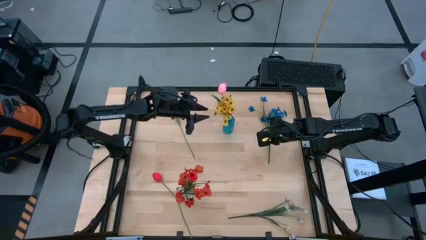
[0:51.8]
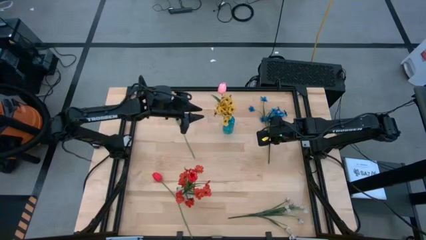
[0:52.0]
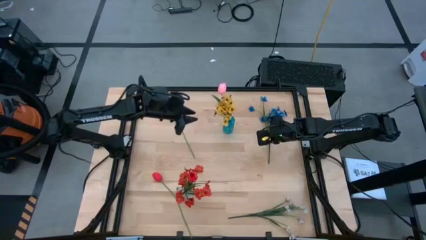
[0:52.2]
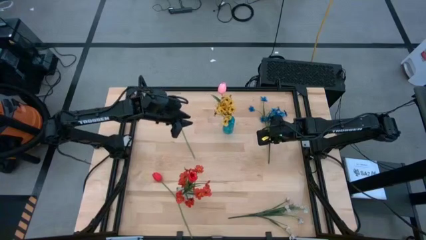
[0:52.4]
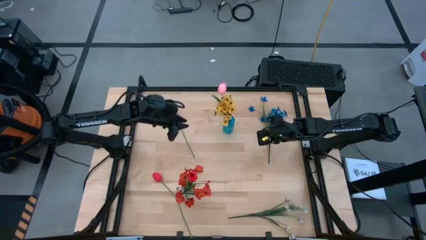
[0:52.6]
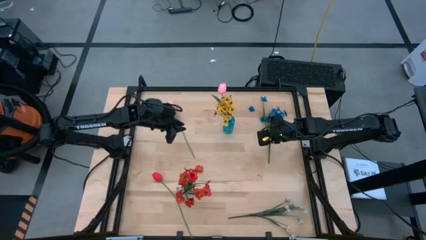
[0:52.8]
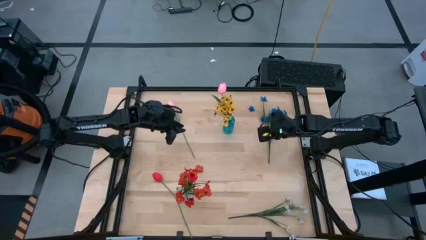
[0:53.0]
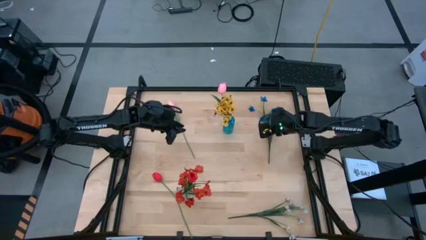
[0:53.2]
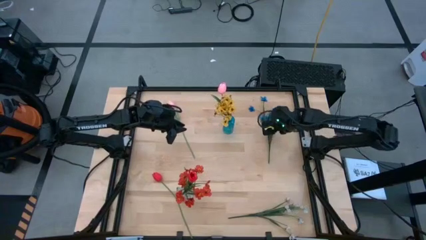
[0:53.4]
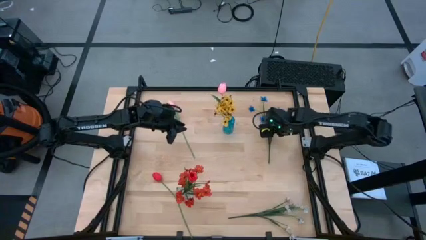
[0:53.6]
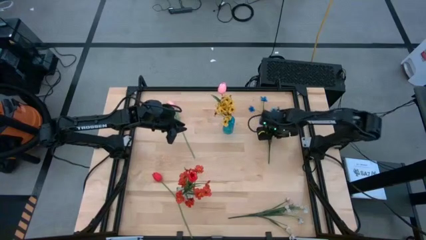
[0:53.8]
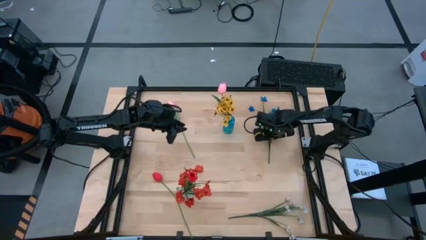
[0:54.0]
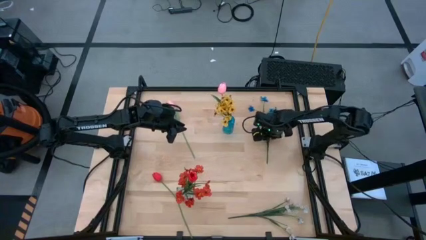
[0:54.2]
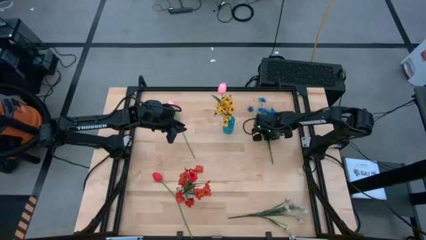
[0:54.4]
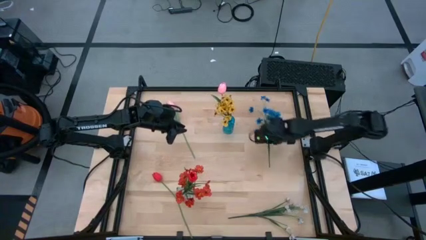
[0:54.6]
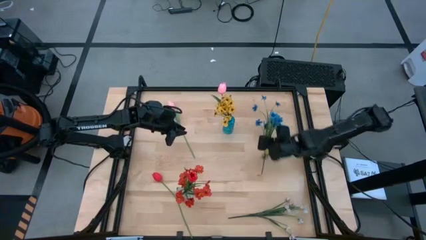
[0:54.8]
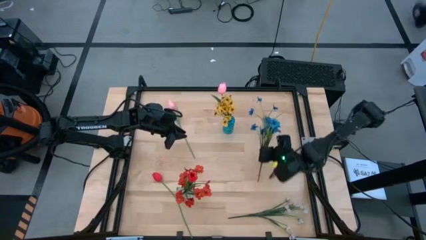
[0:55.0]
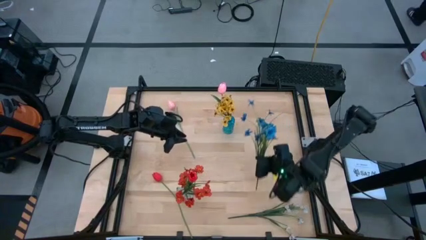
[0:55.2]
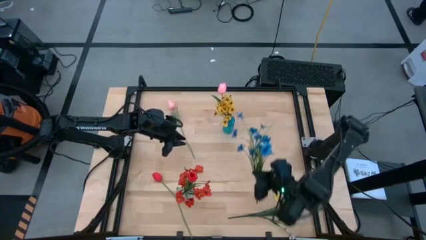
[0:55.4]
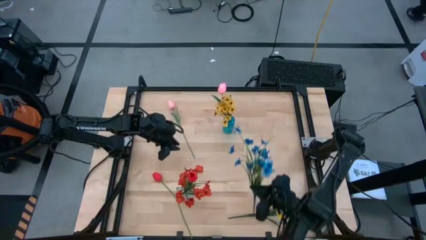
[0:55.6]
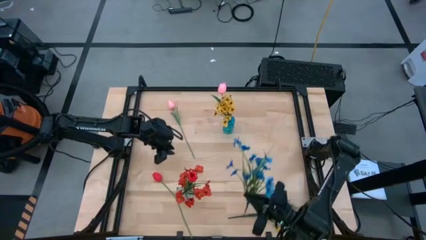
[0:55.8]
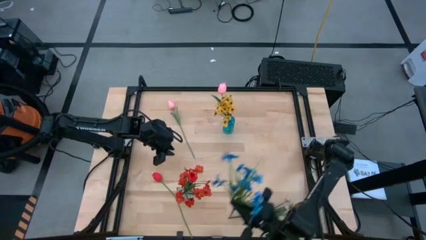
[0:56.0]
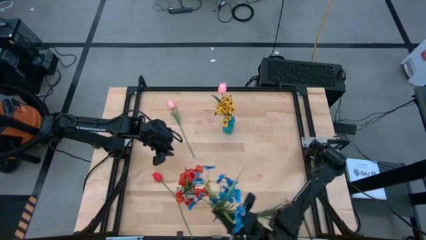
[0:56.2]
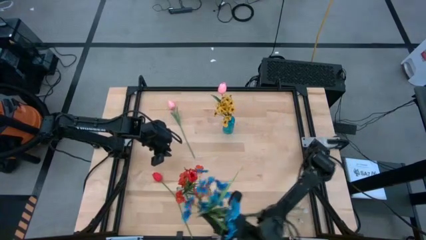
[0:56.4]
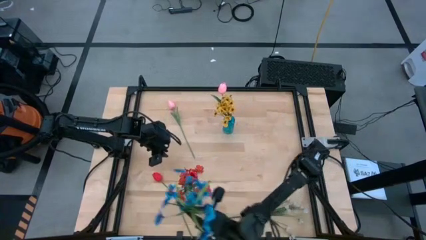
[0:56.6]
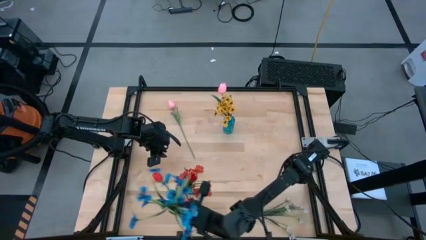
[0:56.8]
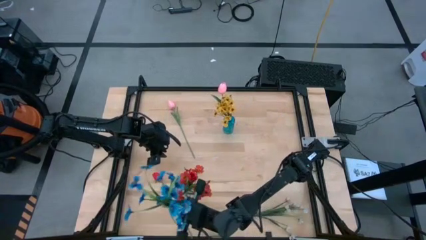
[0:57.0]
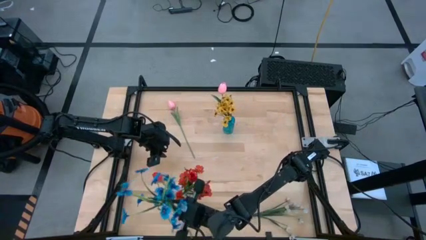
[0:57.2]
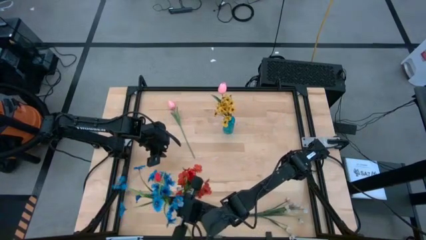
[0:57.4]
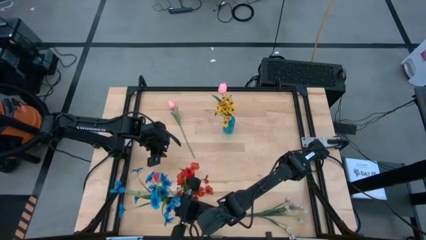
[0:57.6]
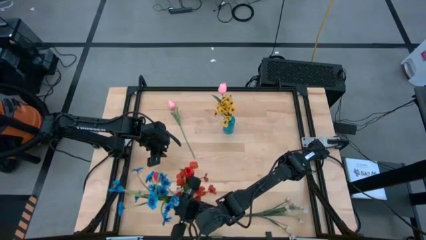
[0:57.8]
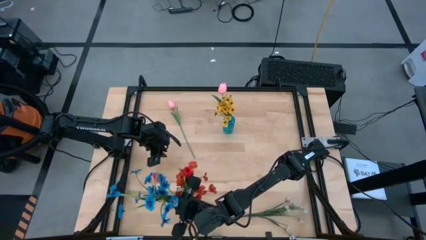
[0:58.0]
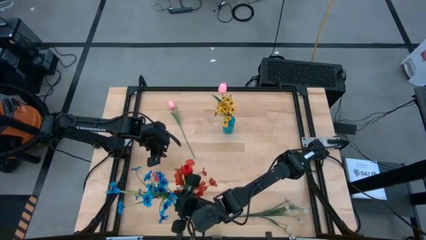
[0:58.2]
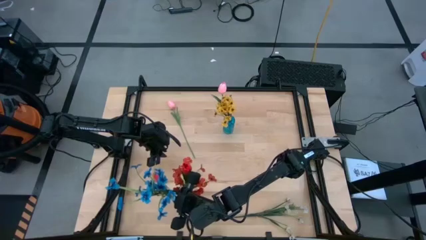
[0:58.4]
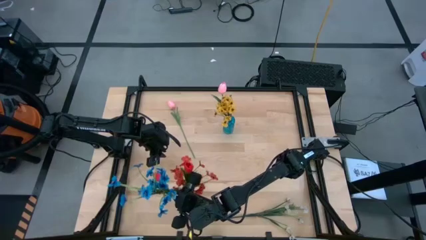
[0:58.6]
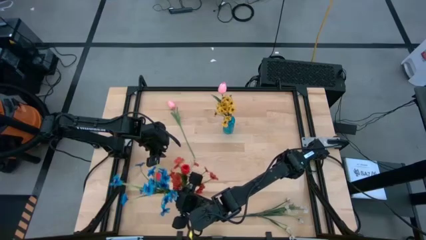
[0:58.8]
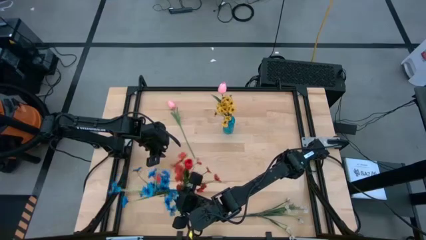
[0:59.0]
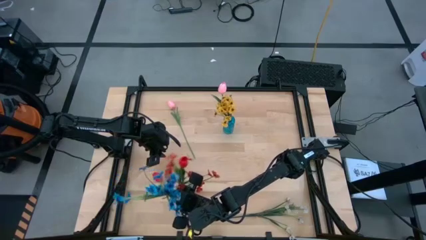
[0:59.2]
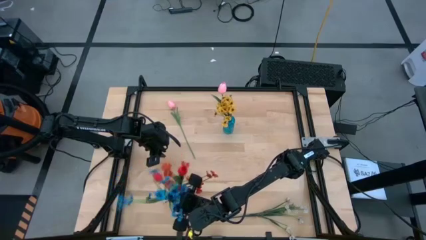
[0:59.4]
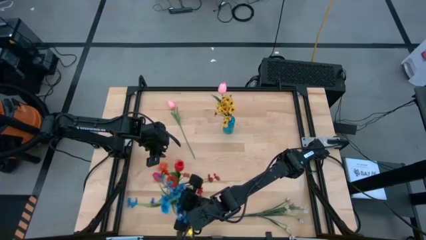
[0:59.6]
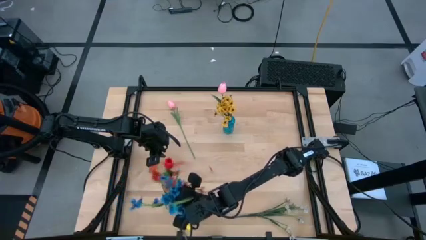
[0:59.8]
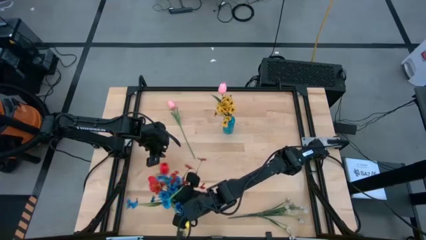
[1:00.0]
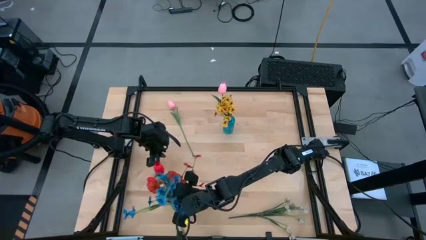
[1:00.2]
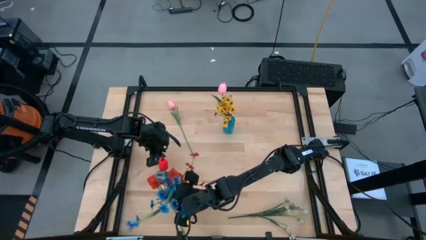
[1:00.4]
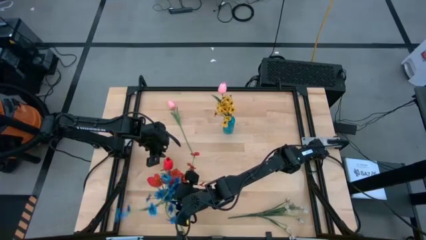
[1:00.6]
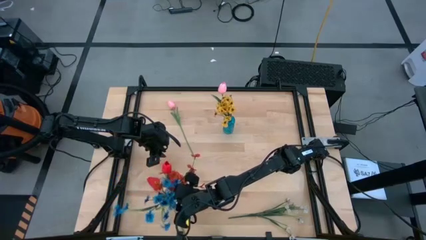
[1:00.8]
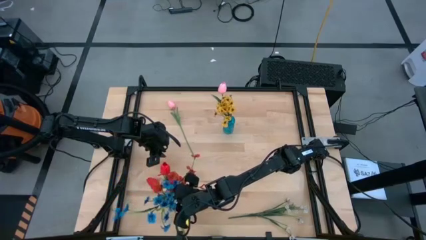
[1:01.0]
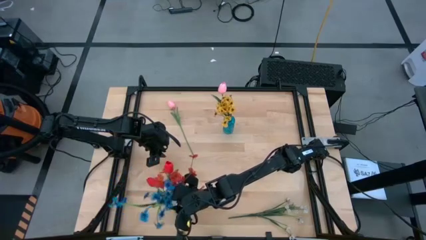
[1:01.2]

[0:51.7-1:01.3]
Task: Sort flowers into vase by color
Put the blue flowers into the transparent vase

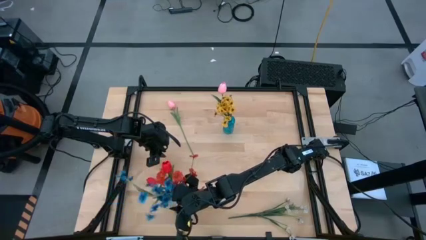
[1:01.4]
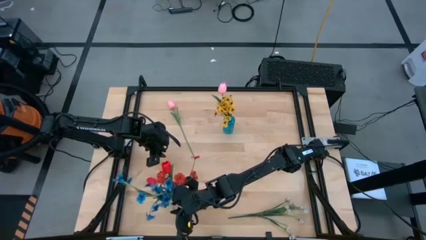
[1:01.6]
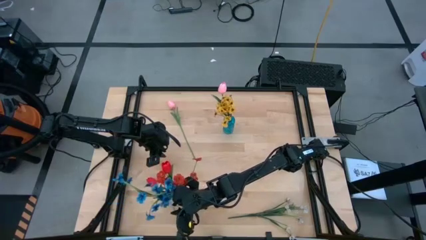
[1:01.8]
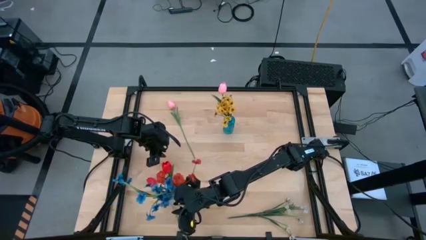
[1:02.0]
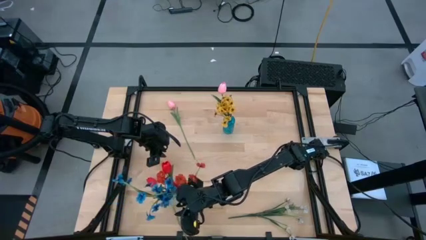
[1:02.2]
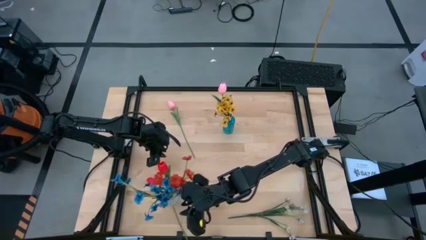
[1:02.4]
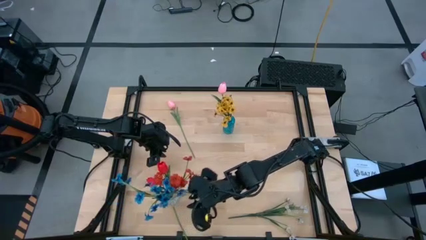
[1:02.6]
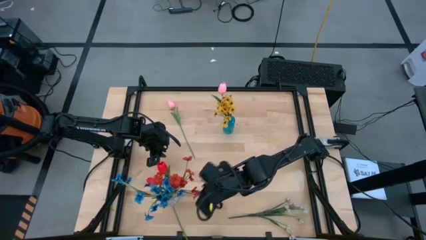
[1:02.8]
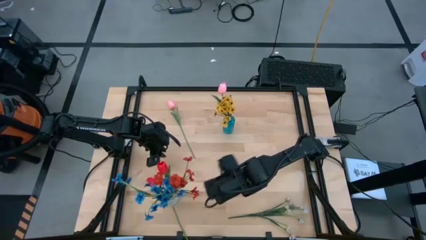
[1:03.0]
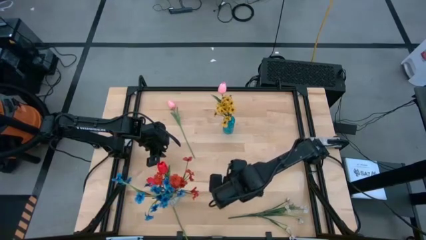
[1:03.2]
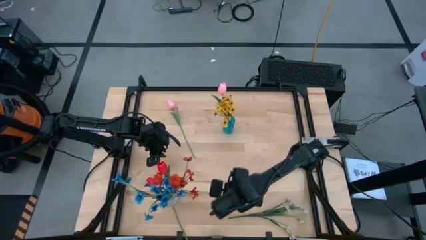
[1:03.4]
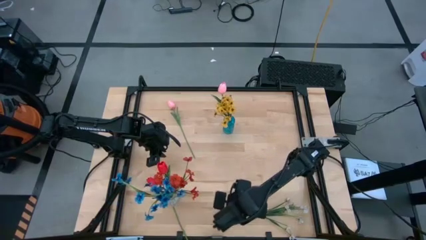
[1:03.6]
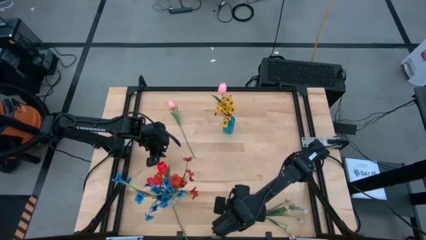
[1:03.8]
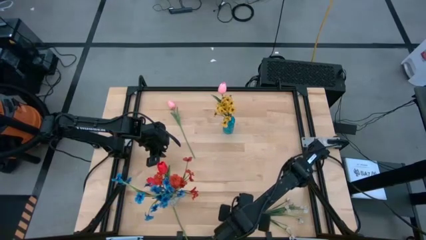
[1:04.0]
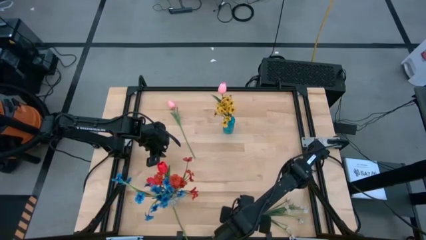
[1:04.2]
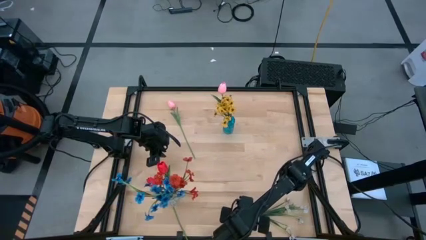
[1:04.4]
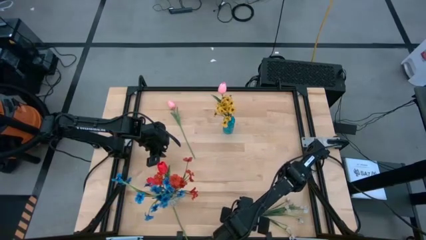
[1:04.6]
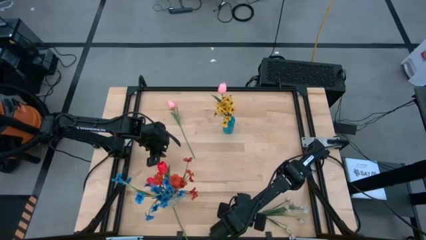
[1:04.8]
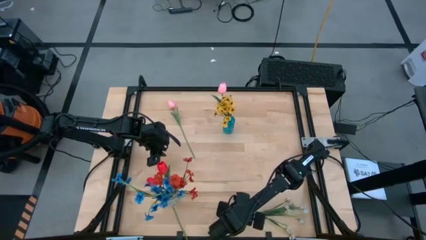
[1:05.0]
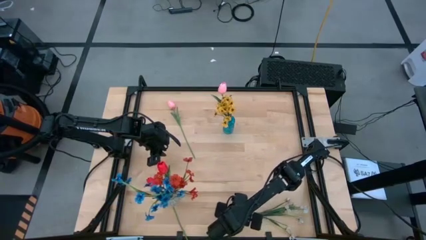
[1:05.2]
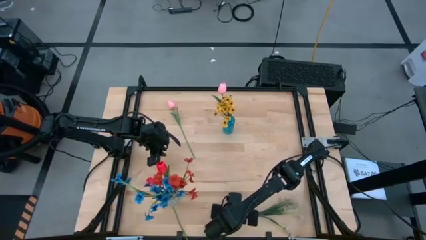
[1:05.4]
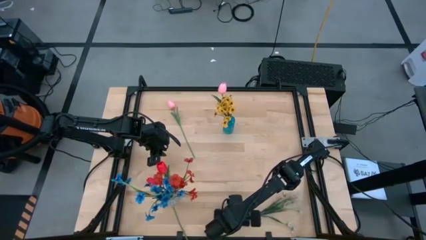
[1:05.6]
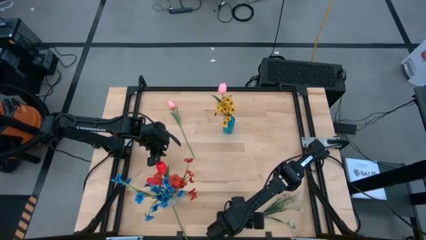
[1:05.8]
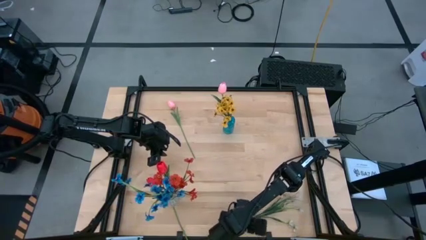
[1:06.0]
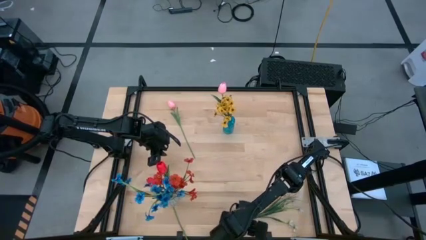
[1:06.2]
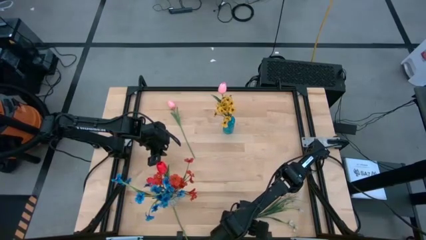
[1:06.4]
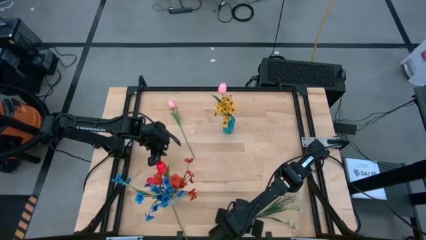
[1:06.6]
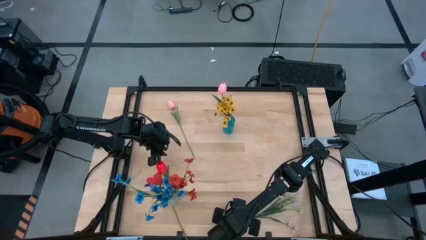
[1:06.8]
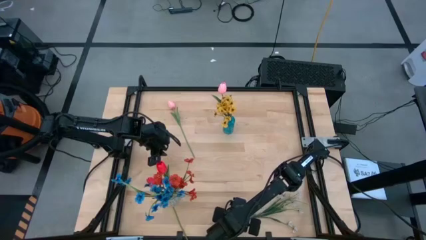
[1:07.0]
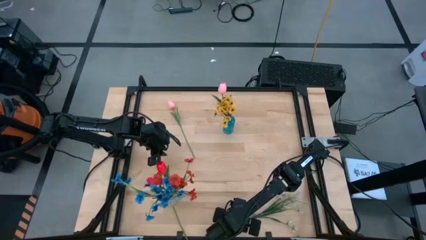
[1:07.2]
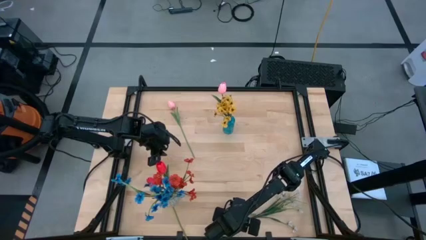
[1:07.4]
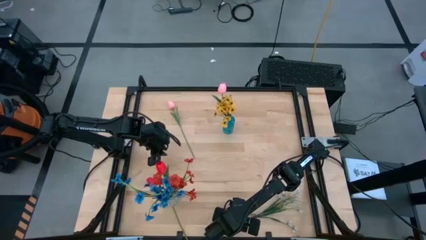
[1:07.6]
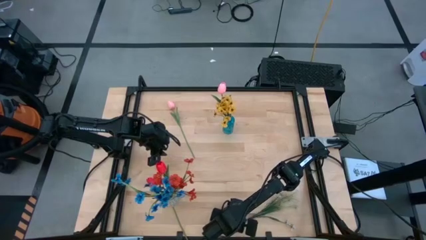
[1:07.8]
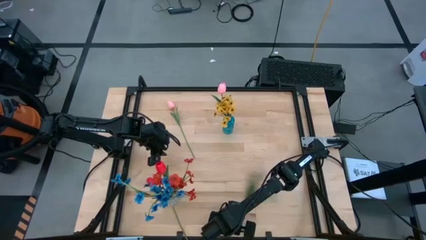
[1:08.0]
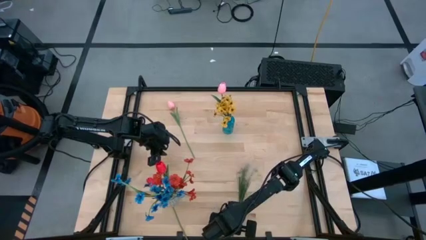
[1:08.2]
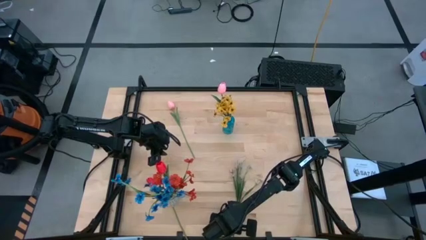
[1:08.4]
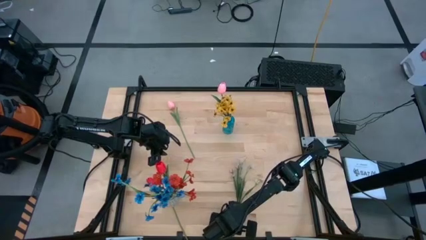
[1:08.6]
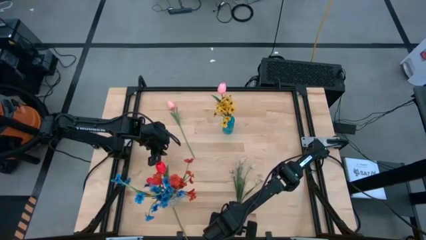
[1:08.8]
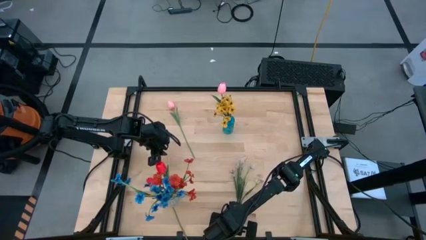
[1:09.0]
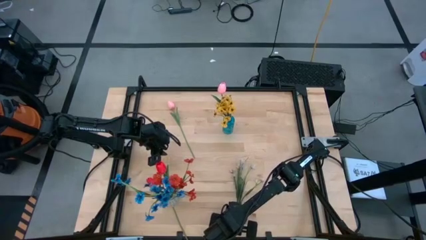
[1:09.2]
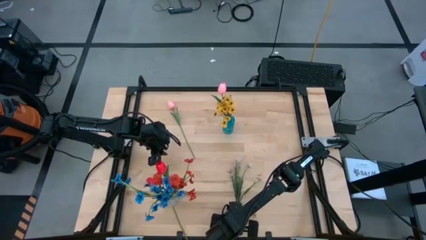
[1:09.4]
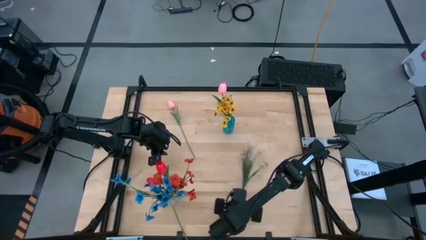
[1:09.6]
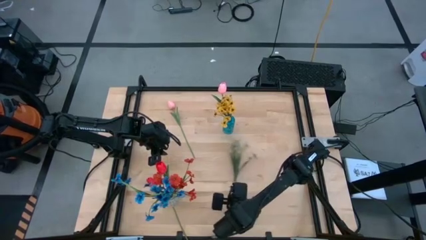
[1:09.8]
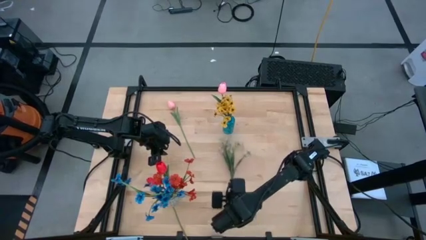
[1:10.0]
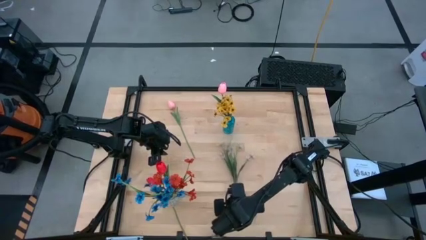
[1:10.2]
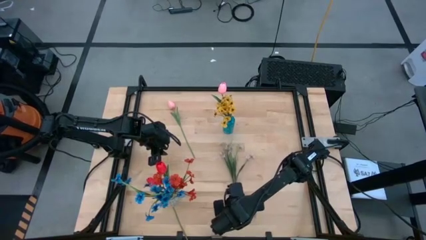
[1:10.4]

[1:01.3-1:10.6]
Put the white flowers into the blue vase
